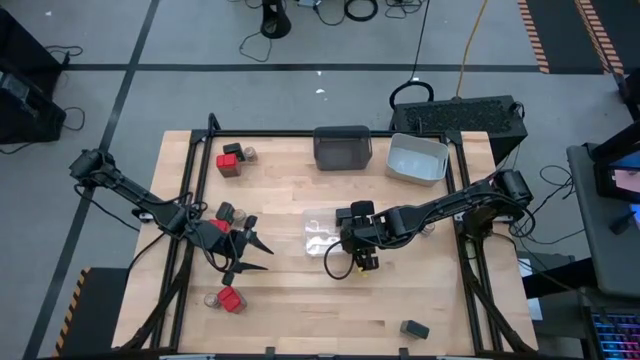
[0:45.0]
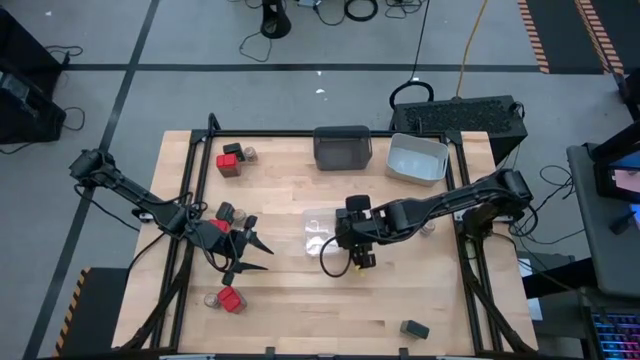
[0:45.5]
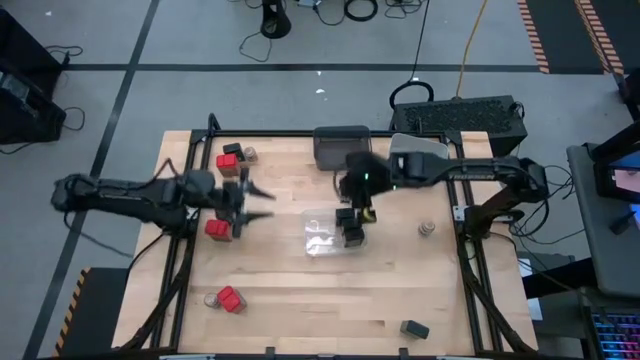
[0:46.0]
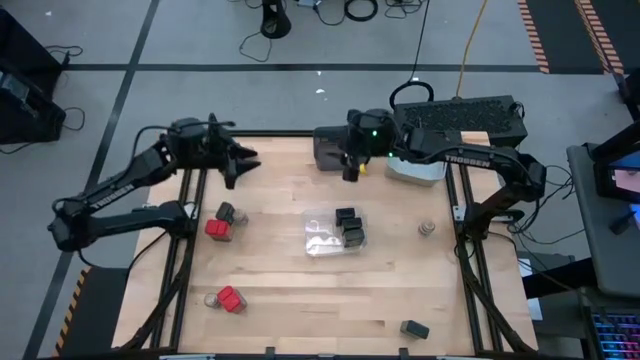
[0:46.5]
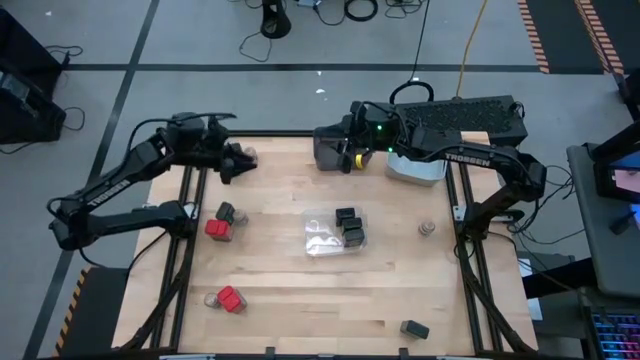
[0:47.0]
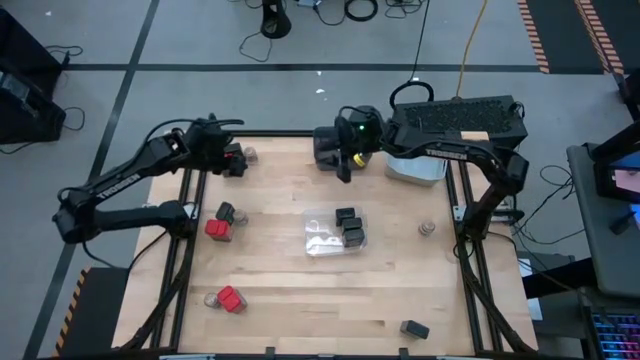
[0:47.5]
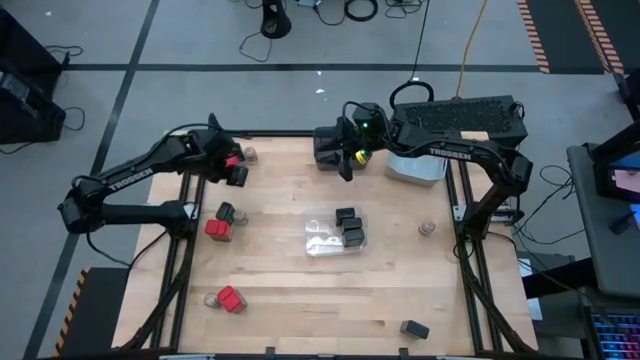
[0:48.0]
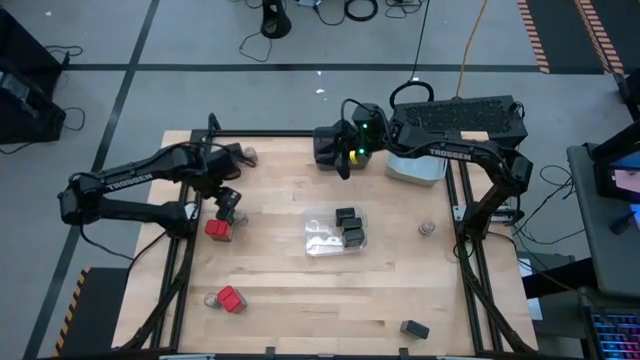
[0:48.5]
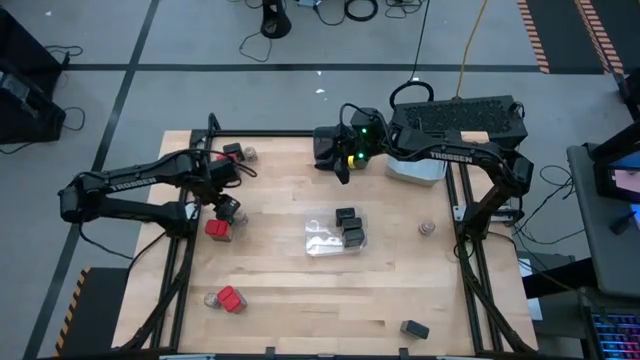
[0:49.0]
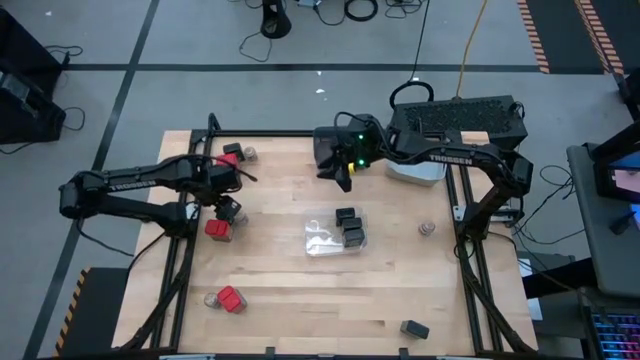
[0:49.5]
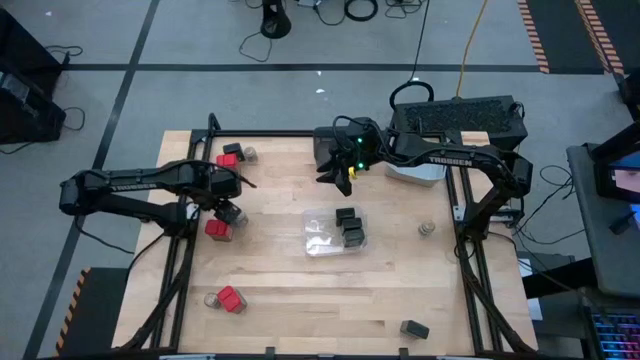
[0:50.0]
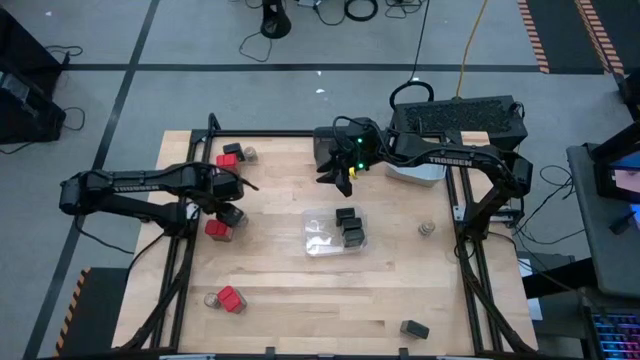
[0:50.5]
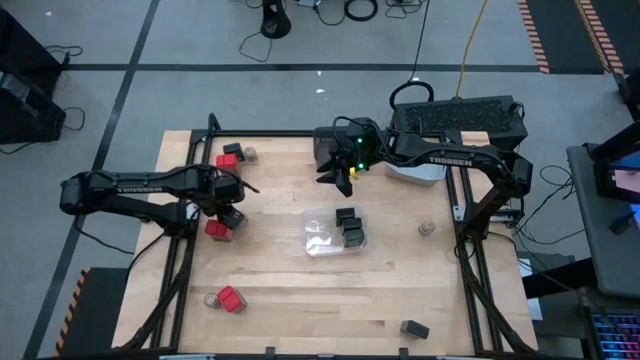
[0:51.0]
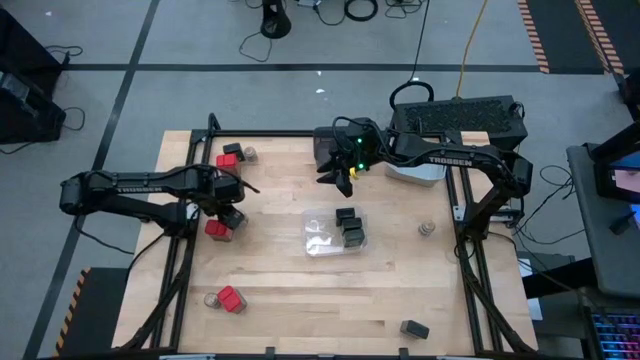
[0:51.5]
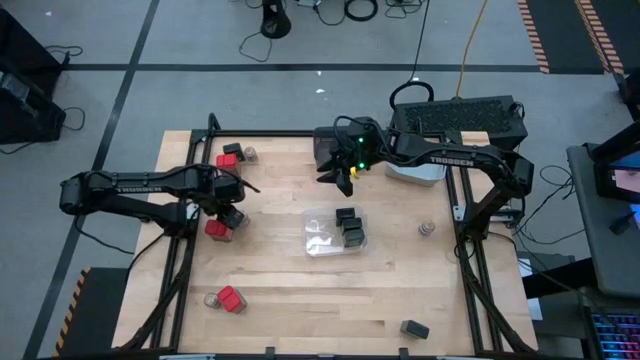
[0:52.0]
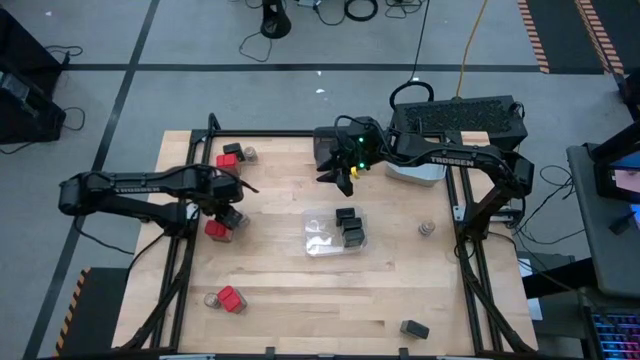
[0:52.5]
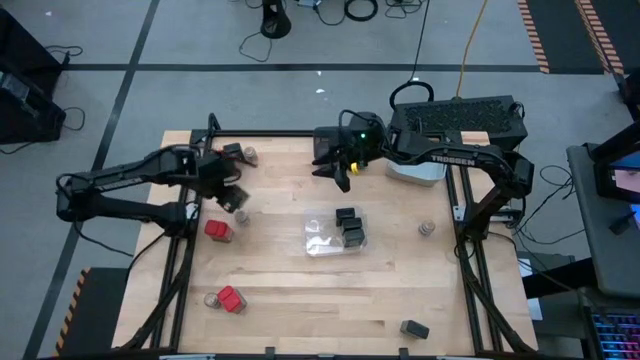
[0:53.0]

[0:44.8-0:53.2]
Task: Sort spices by type
Put the black seasoning can into the transparent bin

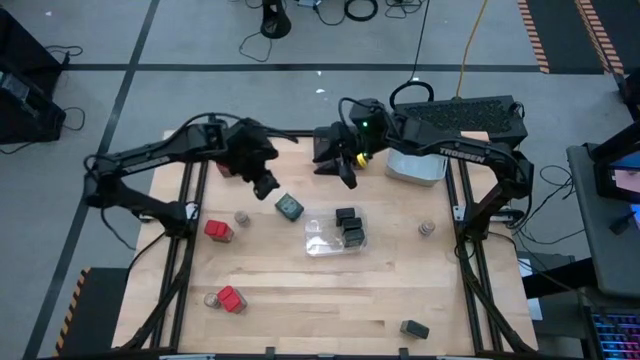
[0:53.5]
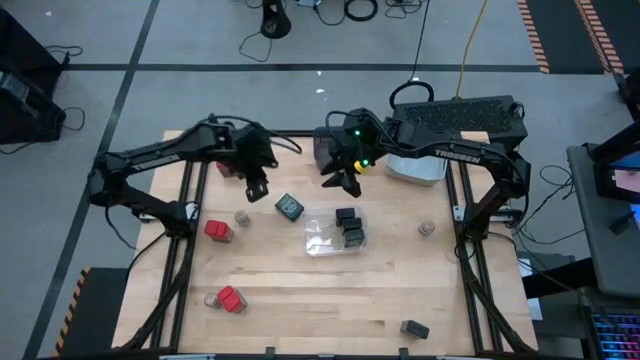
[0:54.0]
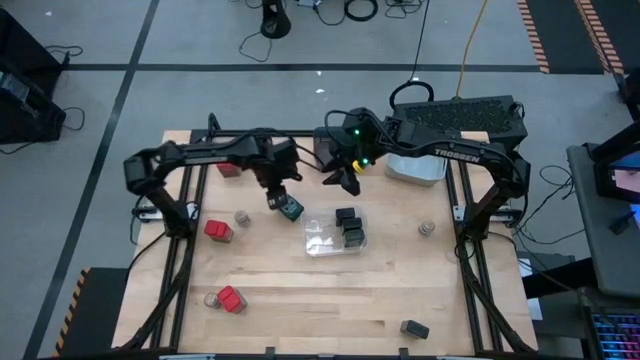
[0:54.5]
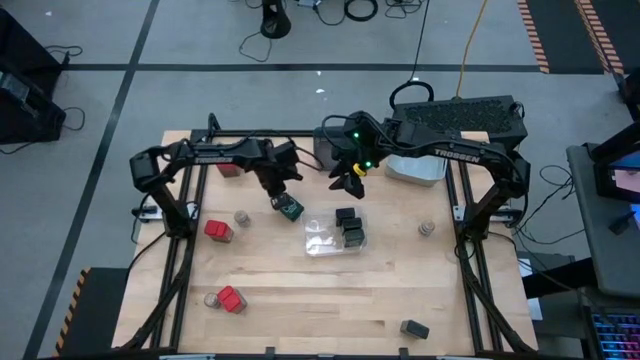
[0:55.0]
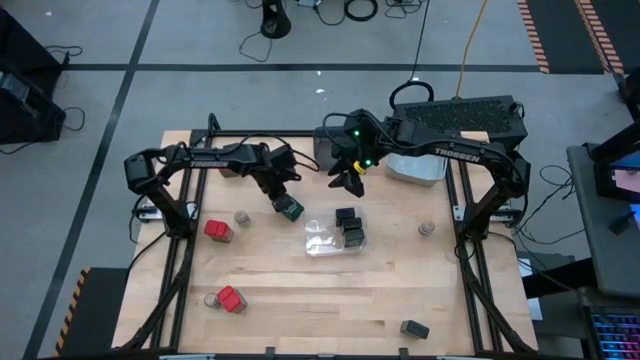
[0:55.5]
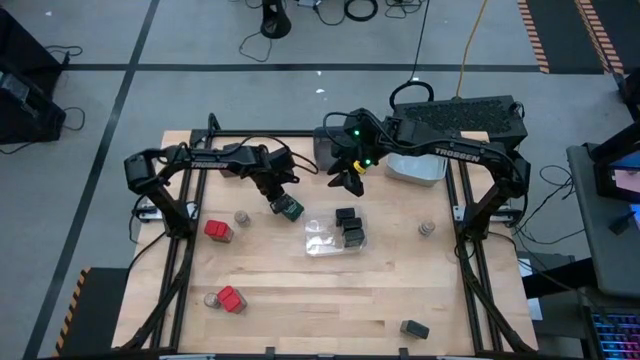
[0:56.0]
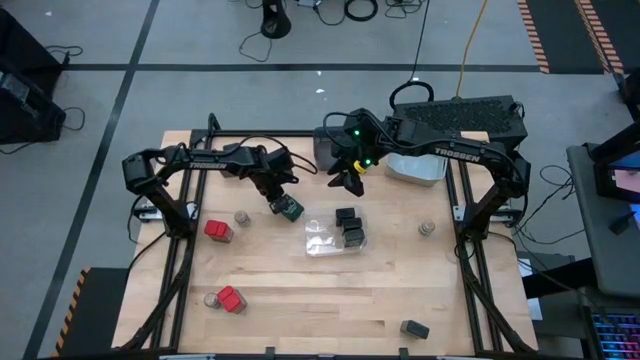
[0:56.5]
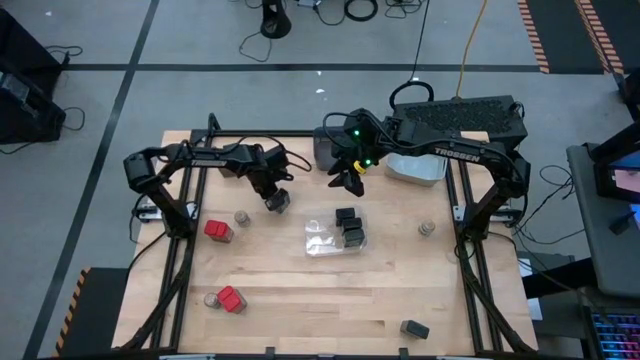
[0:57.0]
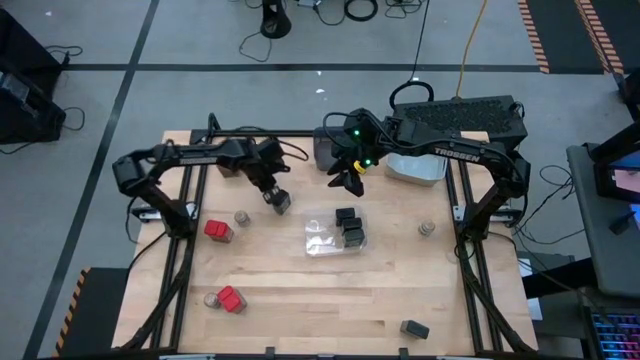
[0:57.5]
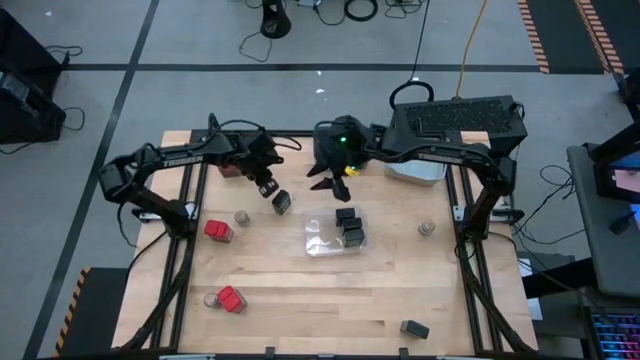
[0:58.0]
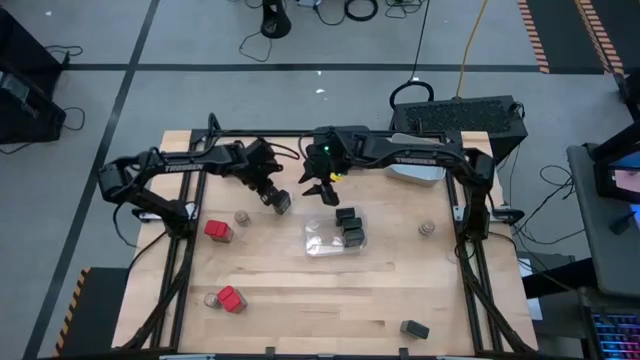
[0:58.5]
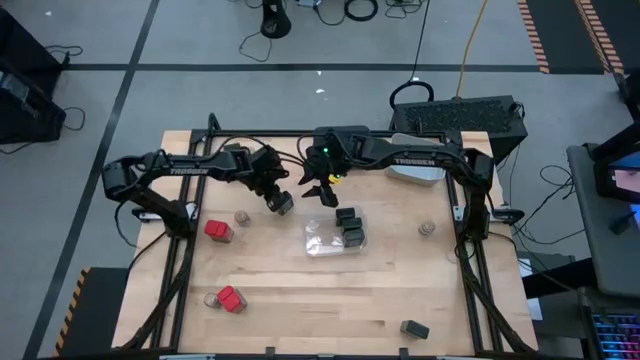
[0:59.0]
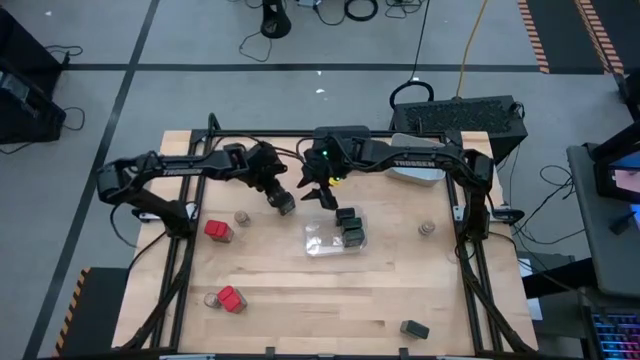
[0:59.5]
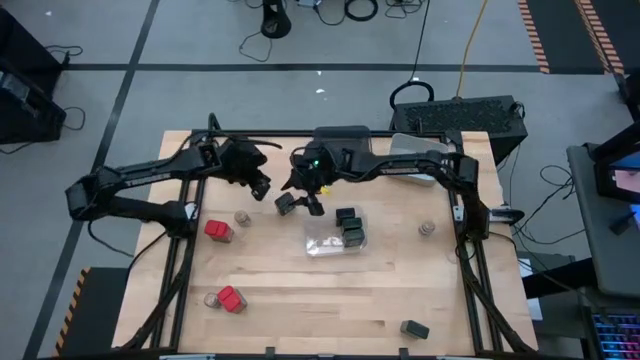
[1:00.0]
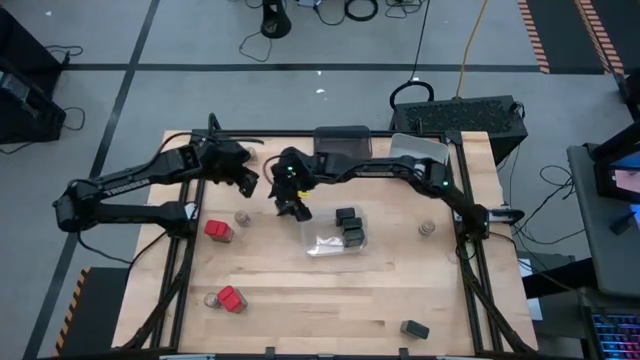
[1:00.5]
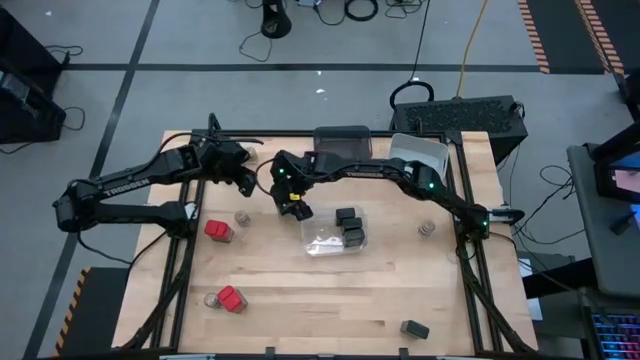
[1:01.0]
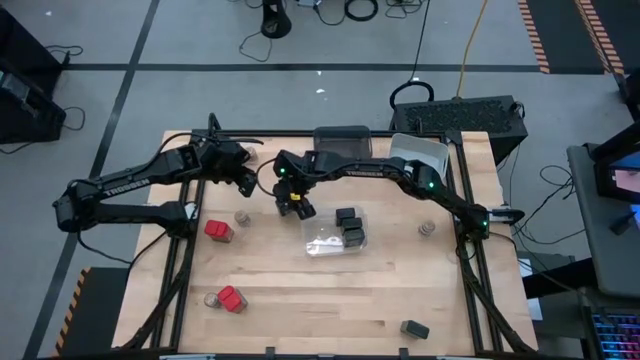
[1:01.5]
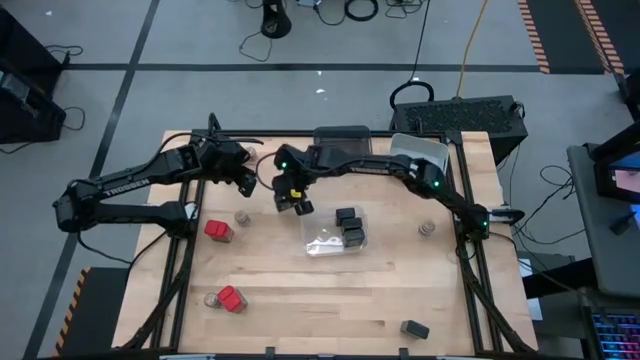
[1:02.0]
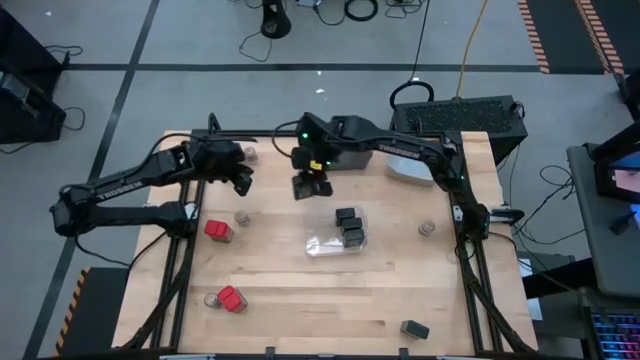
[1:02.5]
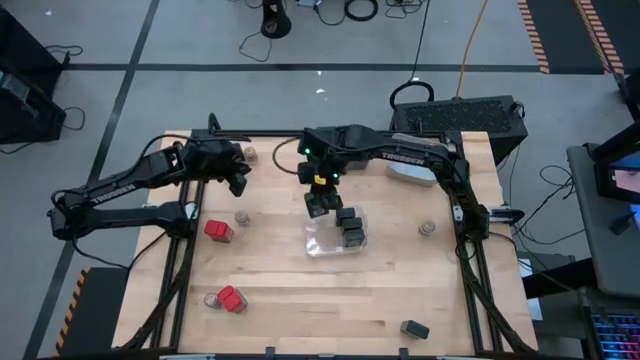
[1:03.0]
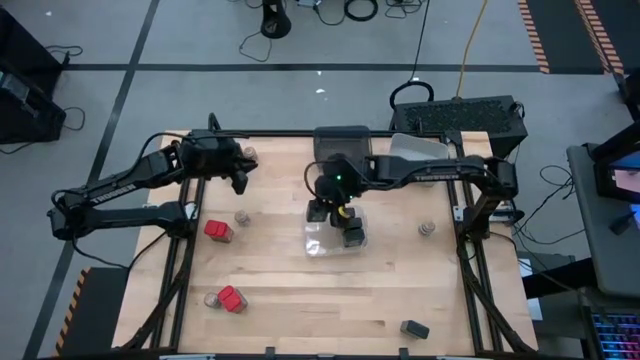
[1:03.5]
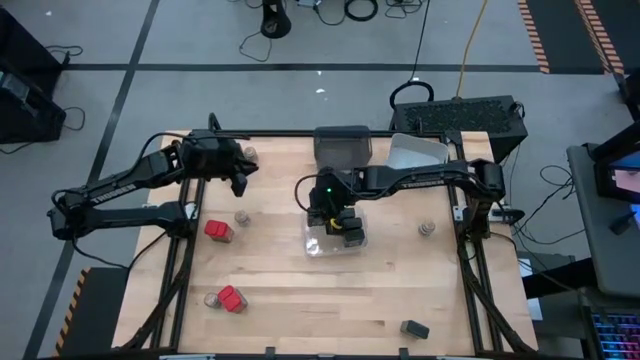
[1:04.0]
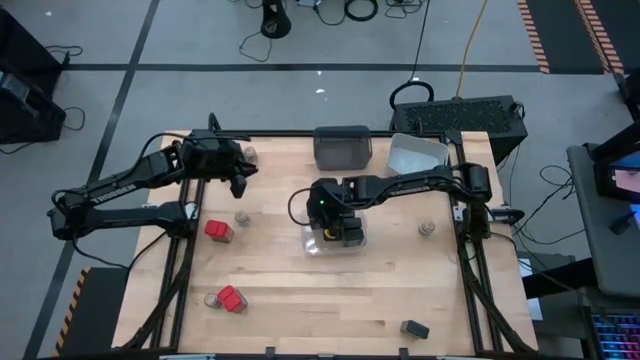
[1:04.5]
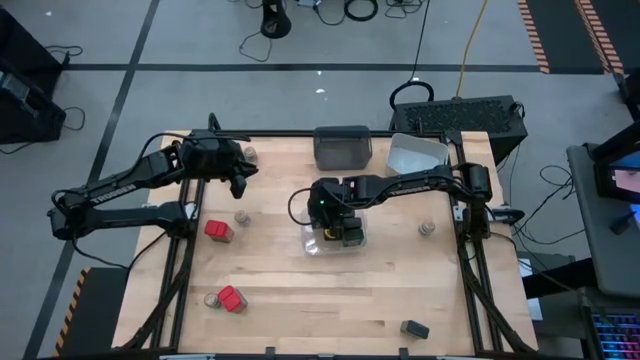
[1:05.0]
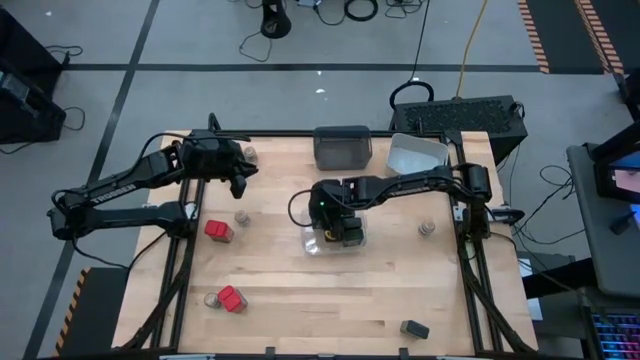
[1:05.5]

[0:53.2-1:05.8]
Put the black seasoning can into the transparent bin

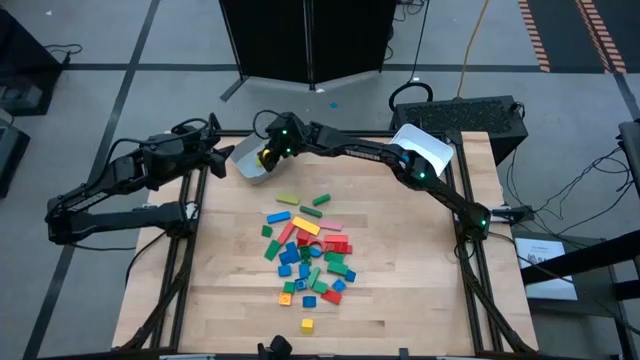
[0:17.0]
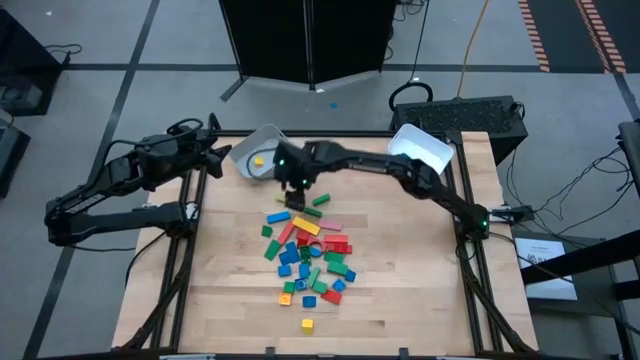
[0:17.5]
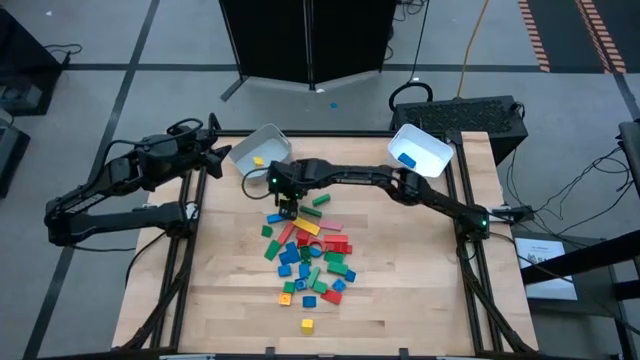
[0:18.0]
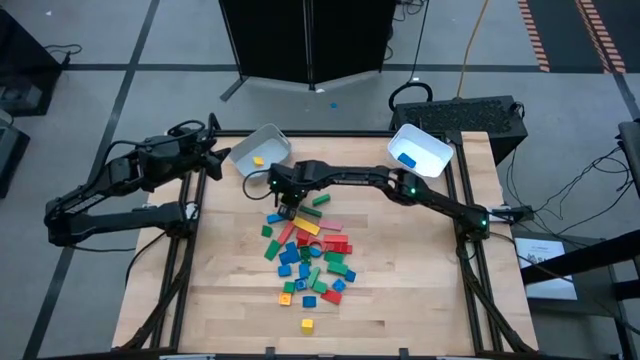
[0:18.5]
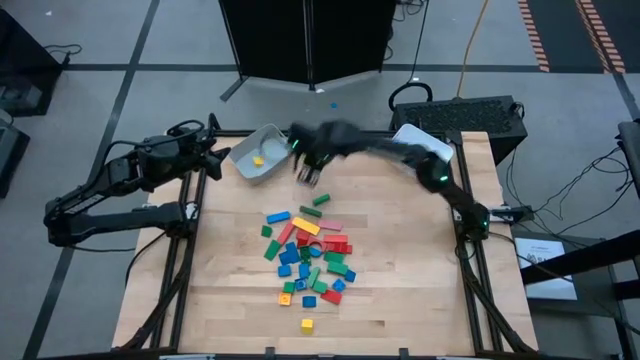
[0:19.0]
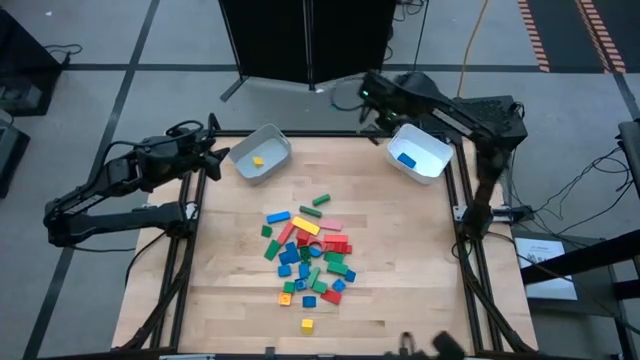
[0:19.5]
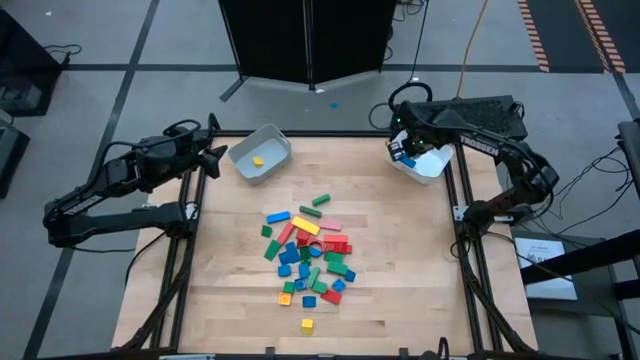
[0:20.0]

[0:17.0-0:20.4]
Task: Sort blocks by size
Put the rectangular light green block into the white bin
